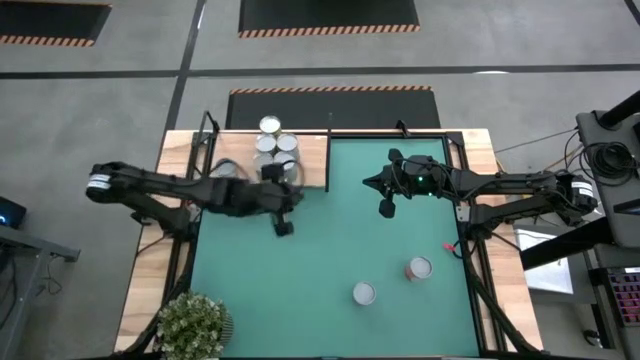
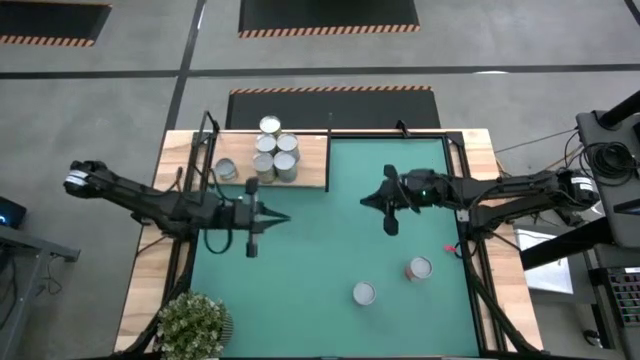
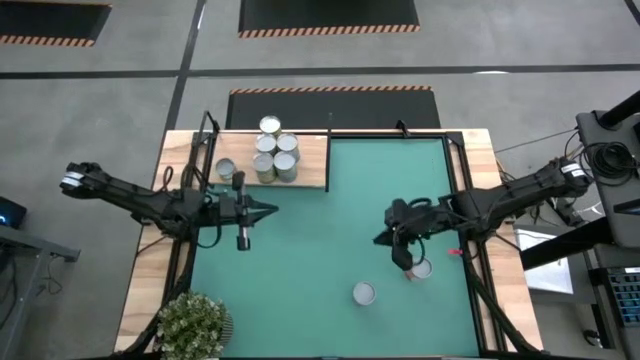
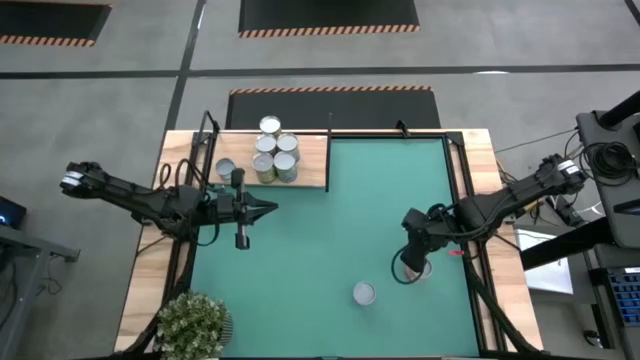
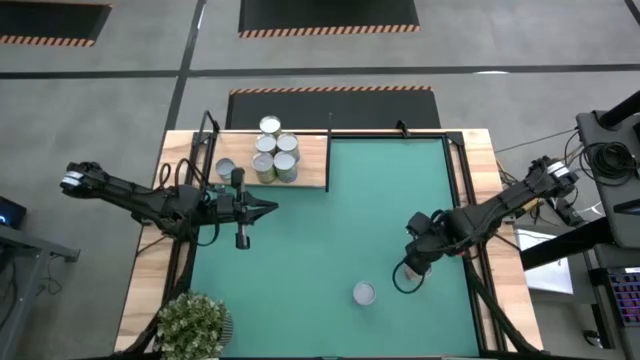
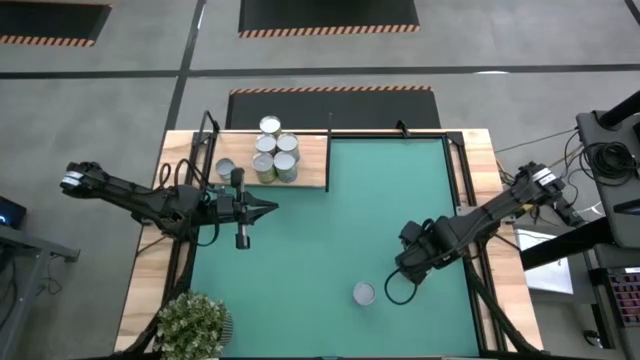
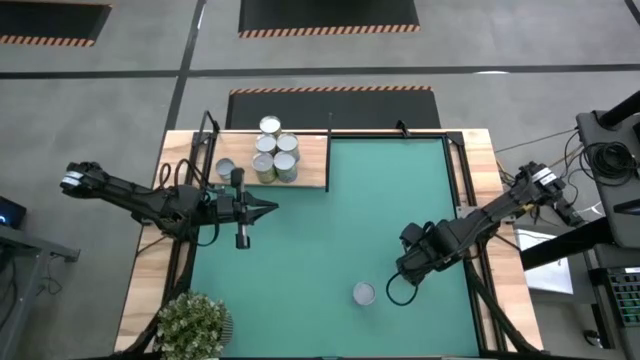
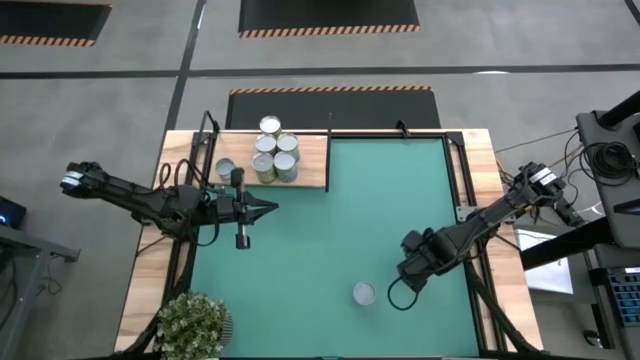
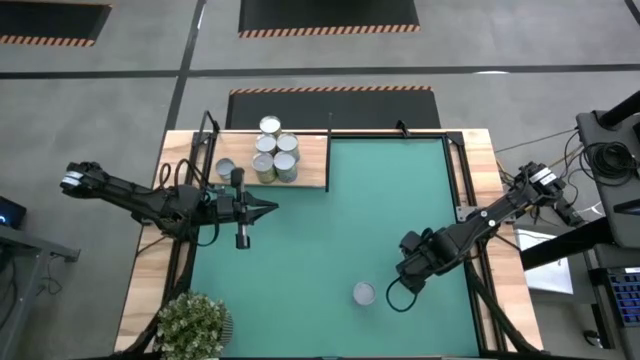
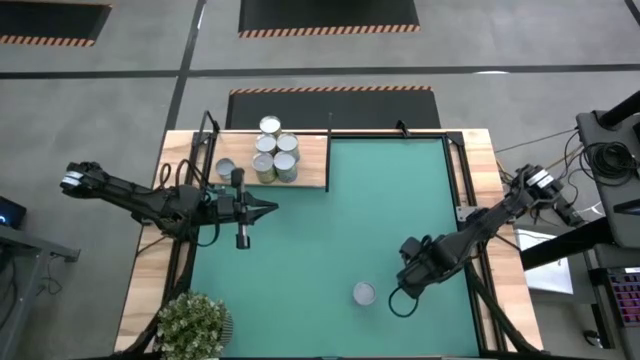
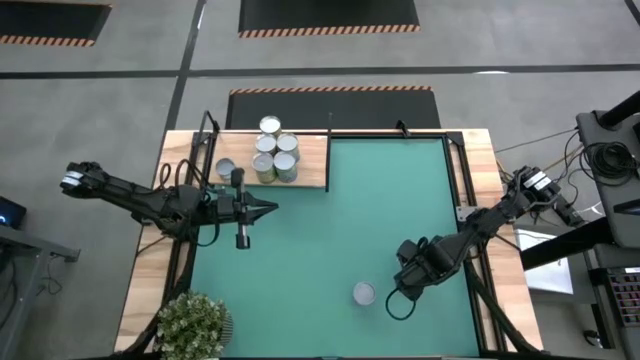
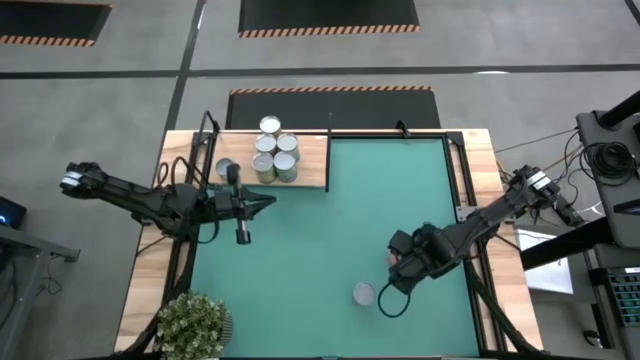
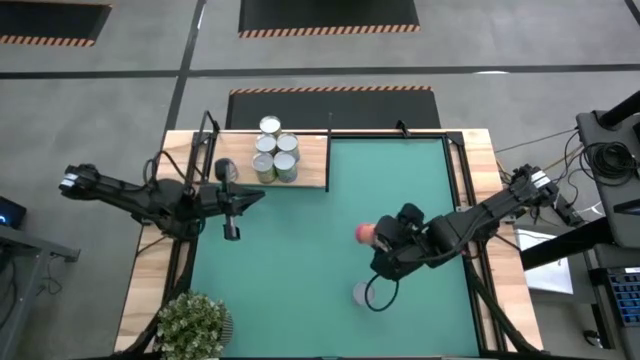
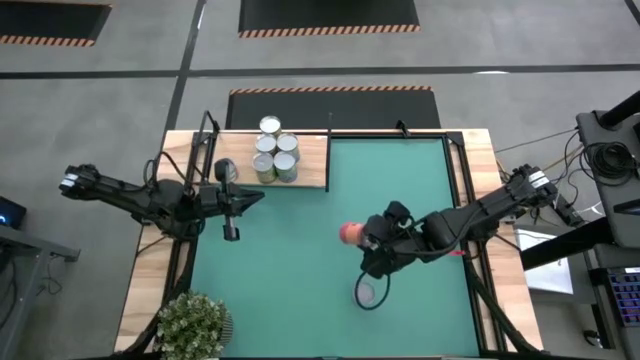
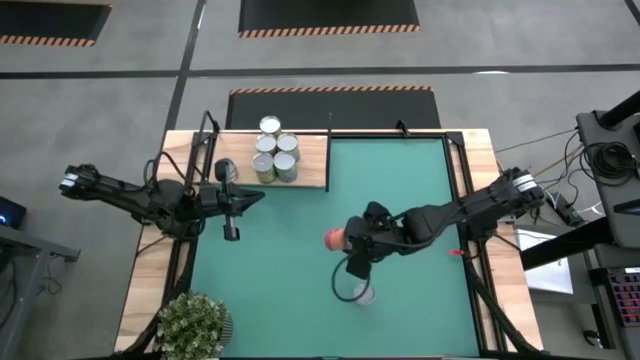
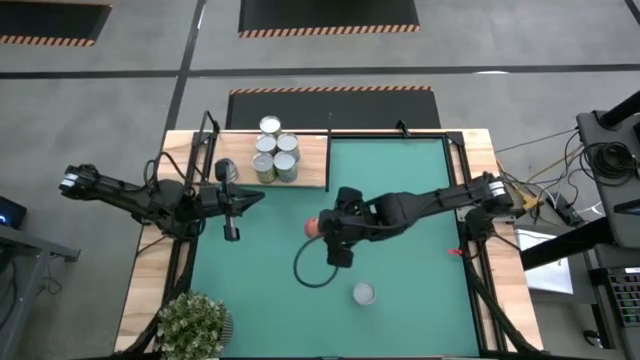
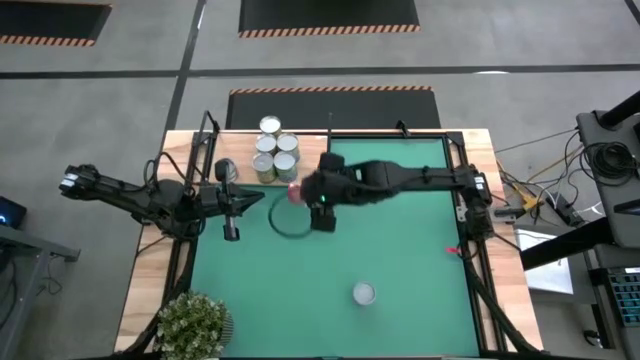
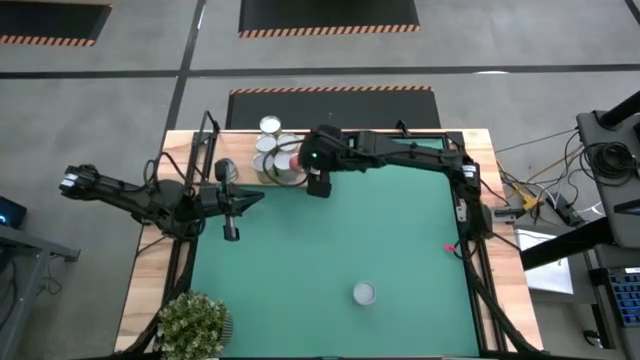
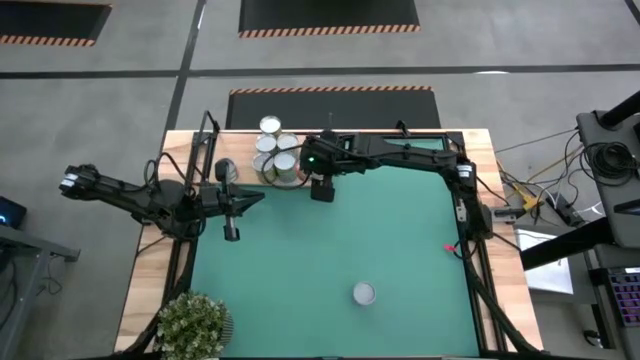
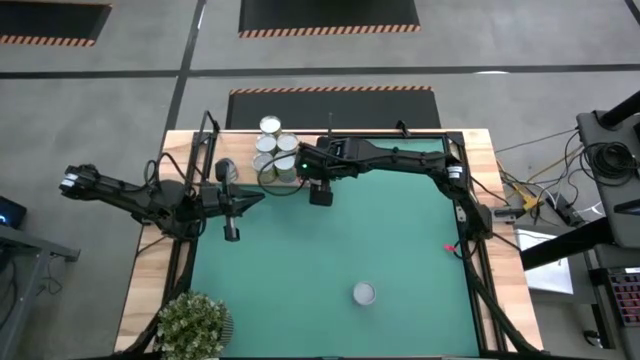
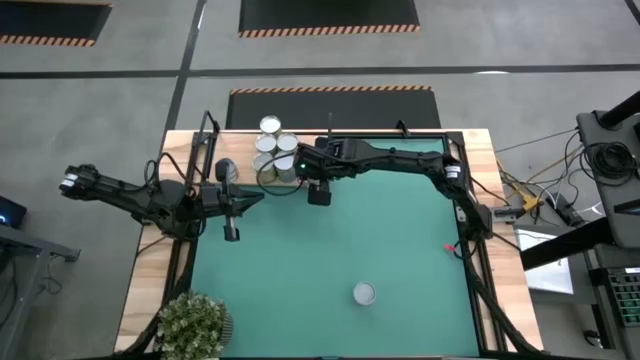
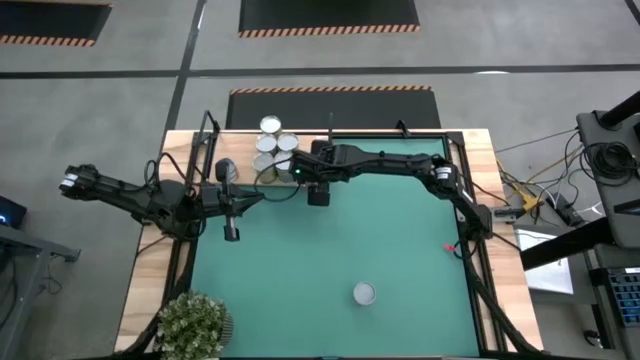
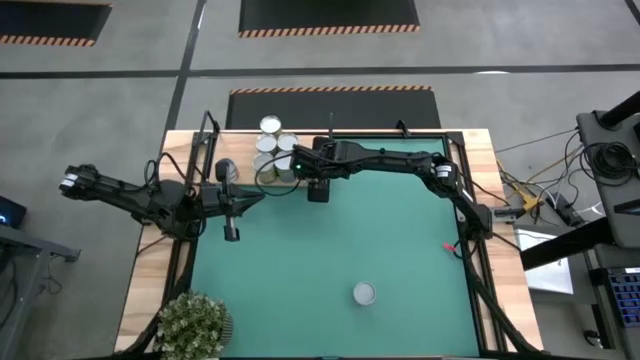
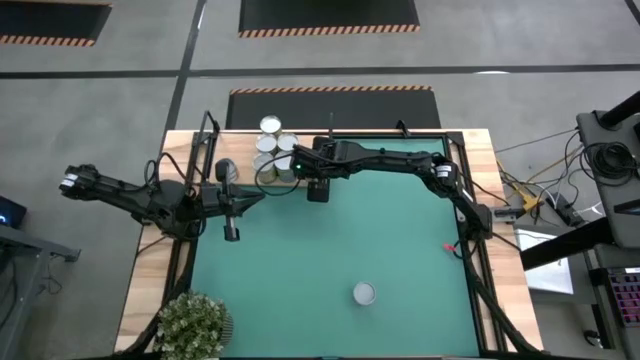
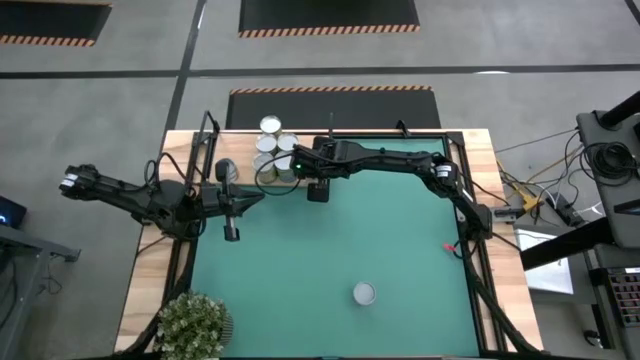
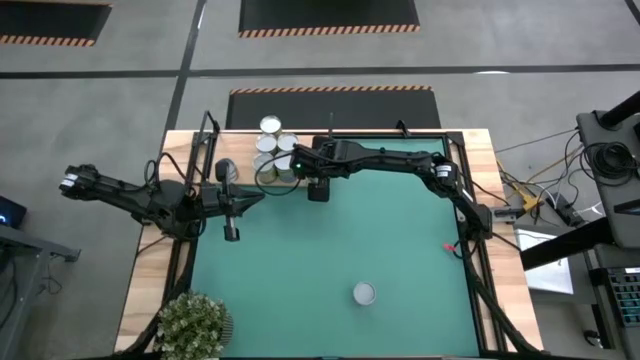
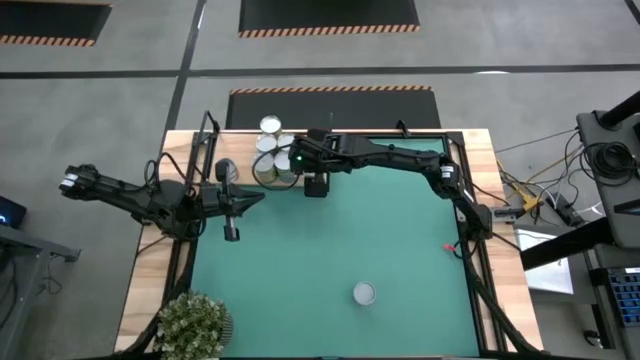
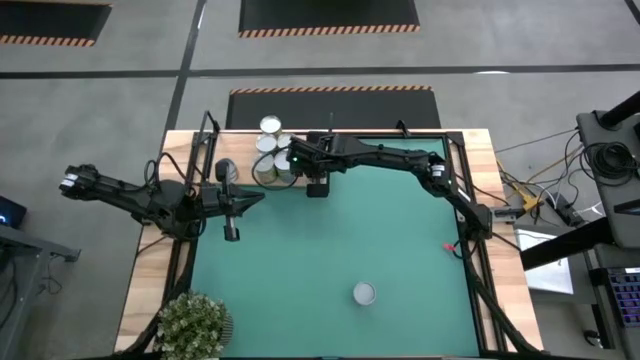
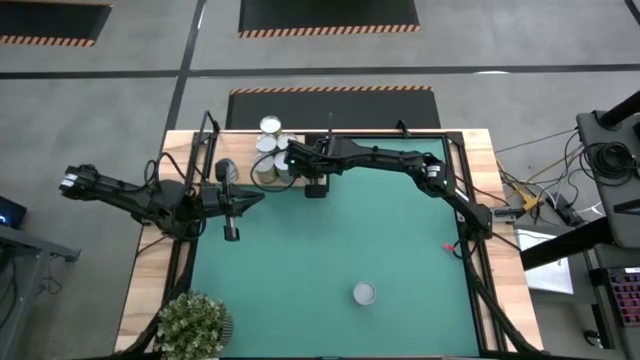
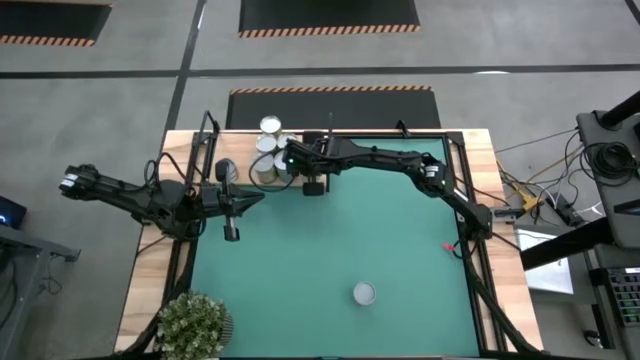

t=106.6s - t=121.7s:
Task: Pick and place cans onto a shelf
Put the canned mixed fruits on the shelf
